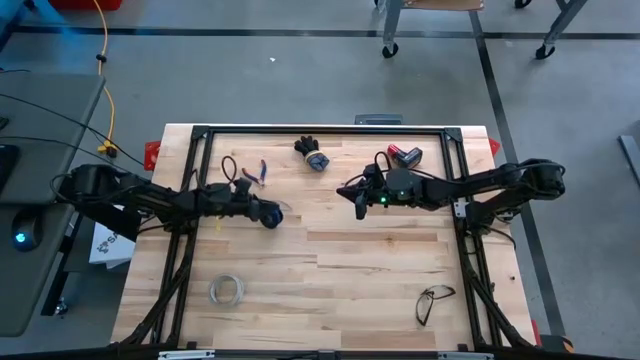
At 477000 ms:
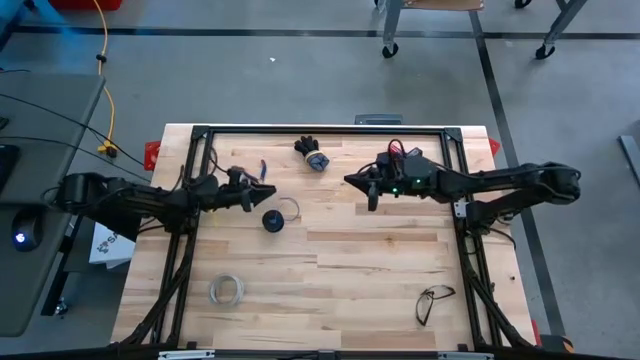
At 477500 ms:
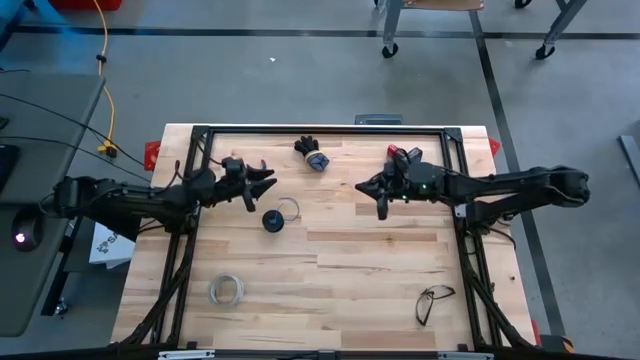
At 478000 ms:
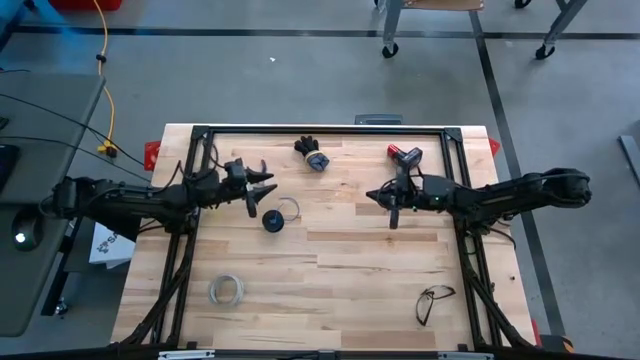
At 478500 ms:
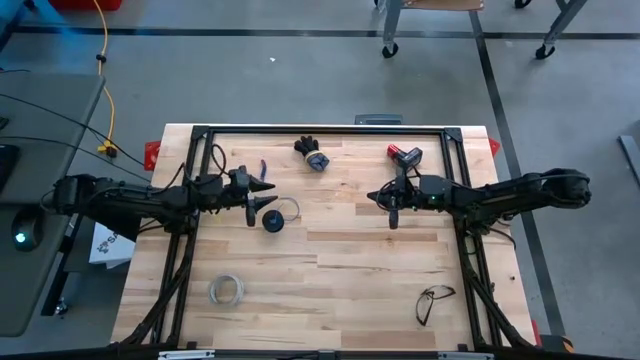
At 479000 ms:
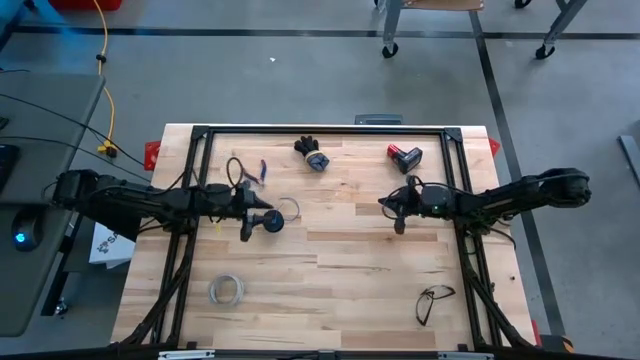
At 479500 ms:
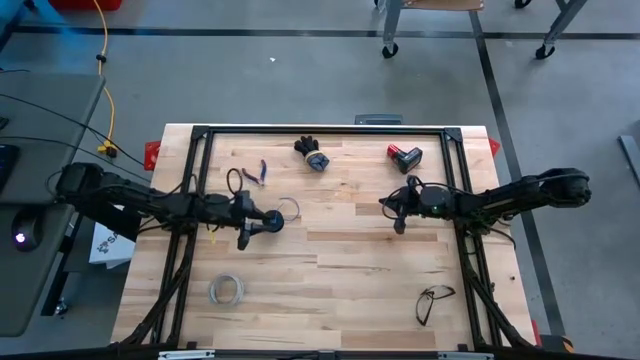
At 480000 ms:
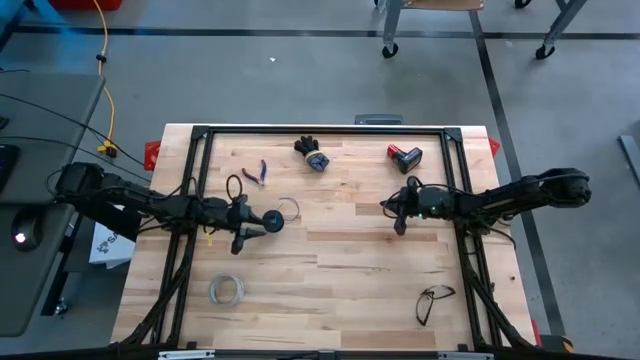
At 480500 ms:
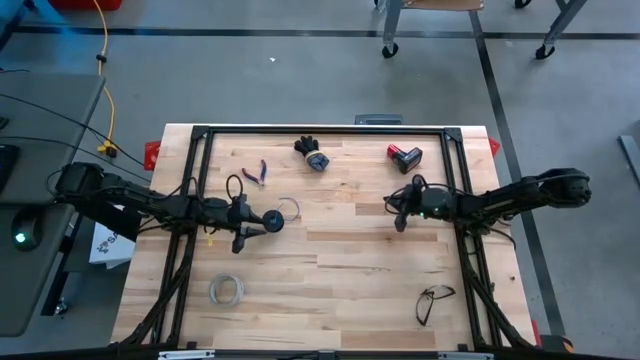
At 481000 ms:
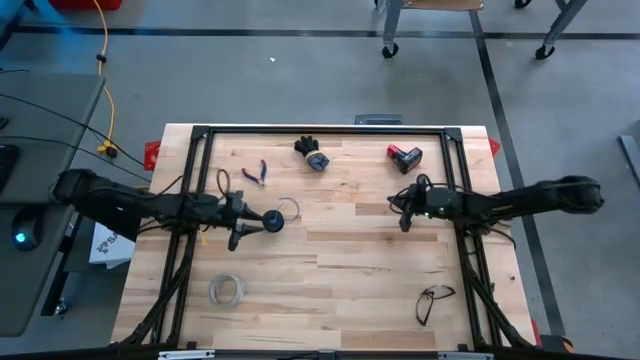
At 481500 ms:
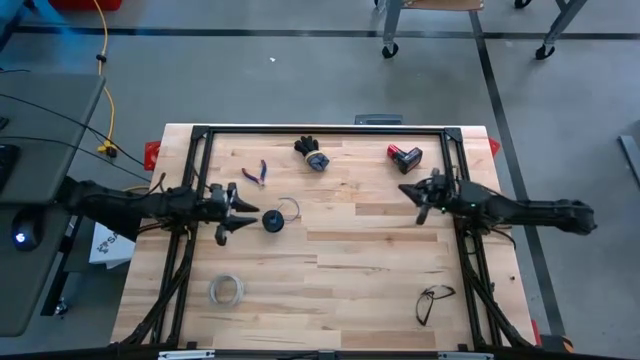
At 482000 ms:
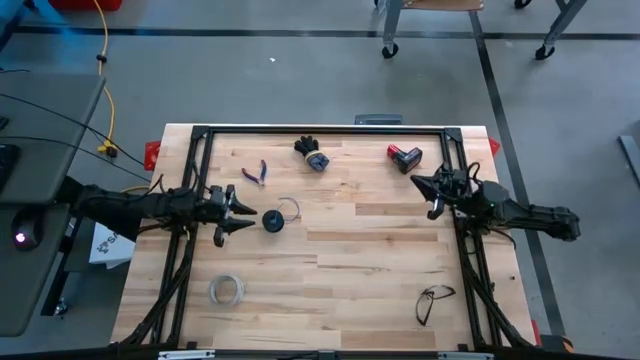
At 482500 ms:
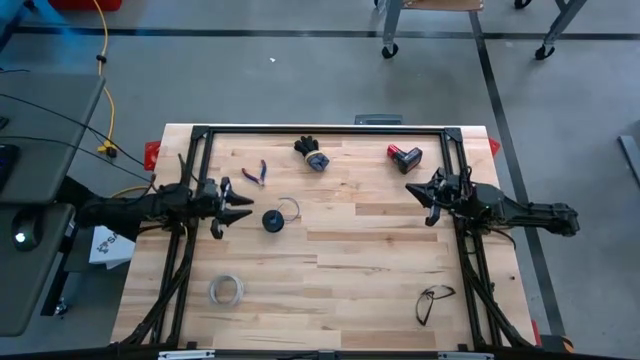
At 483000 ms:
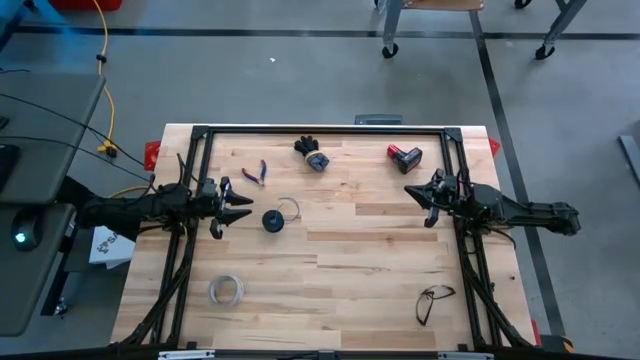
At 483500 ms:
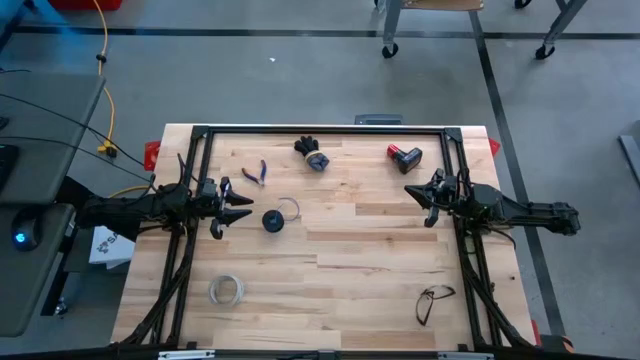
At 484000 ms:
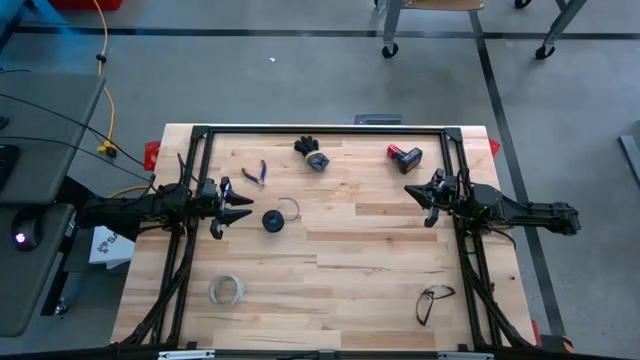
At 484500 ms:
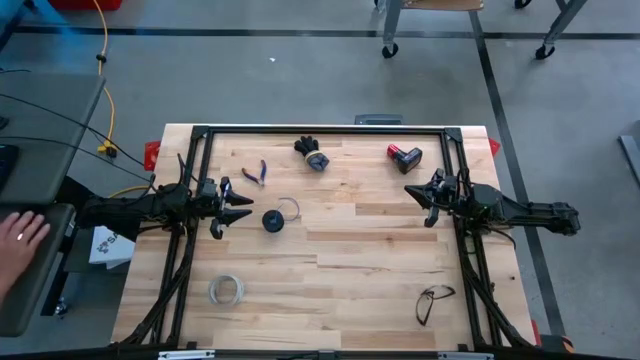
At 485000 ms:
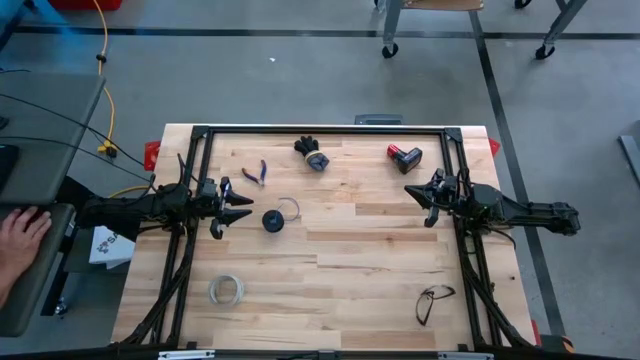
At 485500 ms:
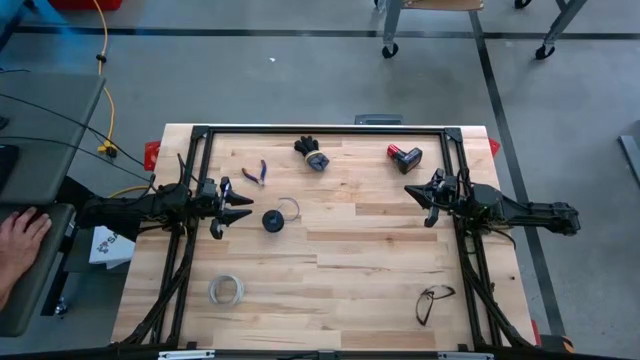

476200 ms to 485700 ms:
Task: Coil cords
Return to Home Position

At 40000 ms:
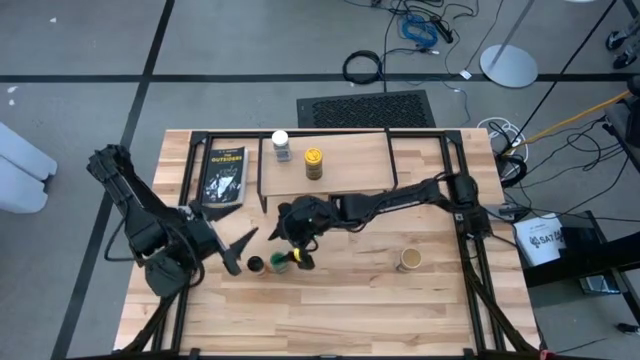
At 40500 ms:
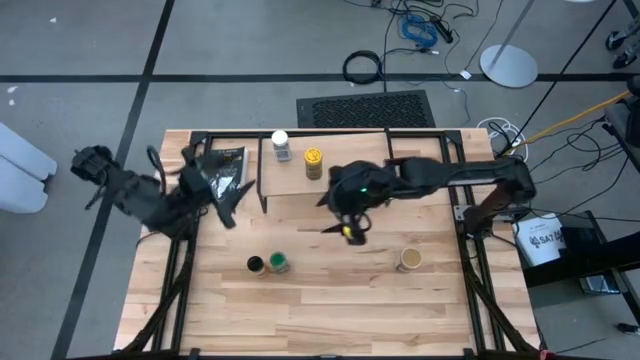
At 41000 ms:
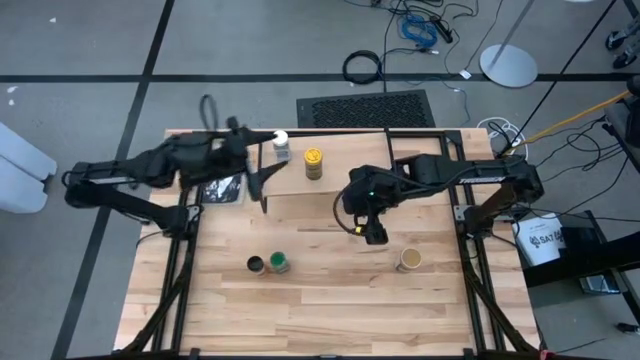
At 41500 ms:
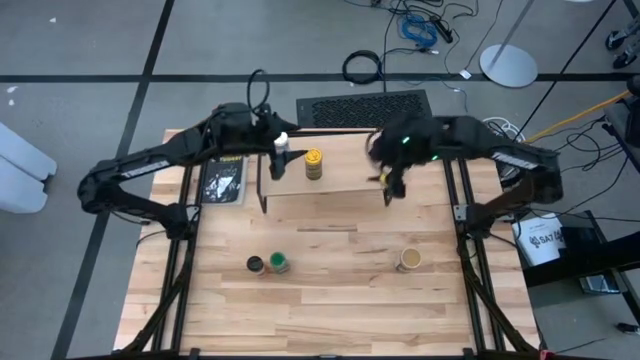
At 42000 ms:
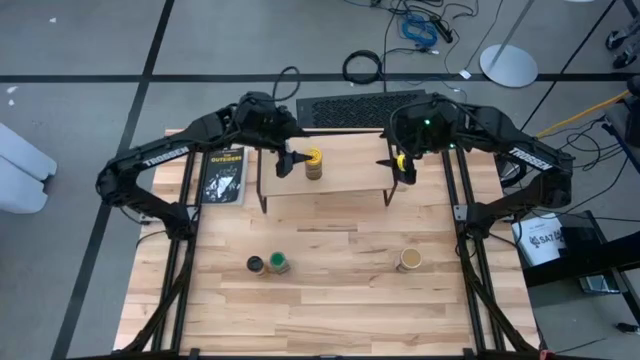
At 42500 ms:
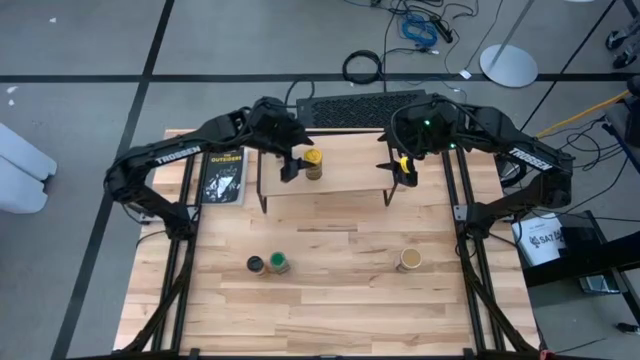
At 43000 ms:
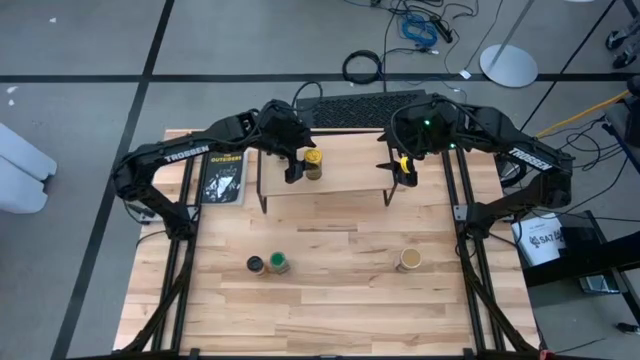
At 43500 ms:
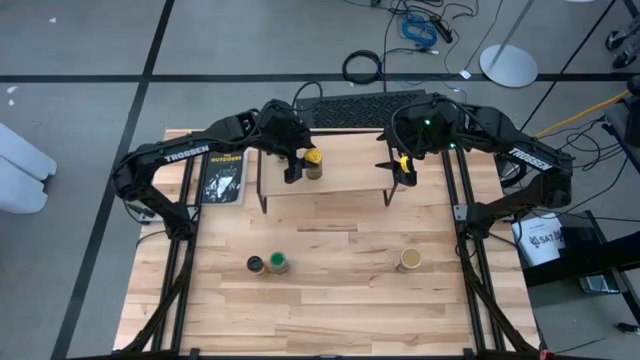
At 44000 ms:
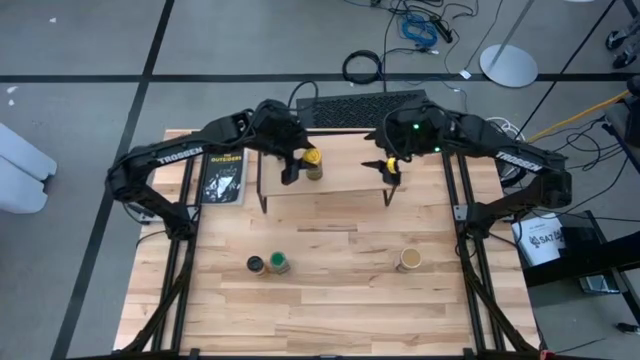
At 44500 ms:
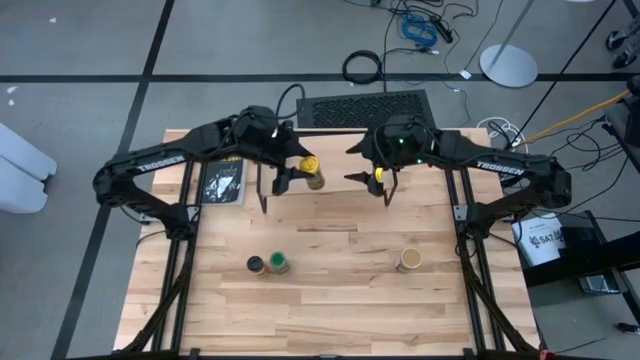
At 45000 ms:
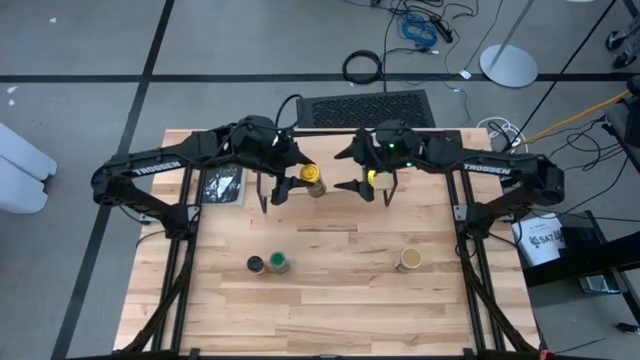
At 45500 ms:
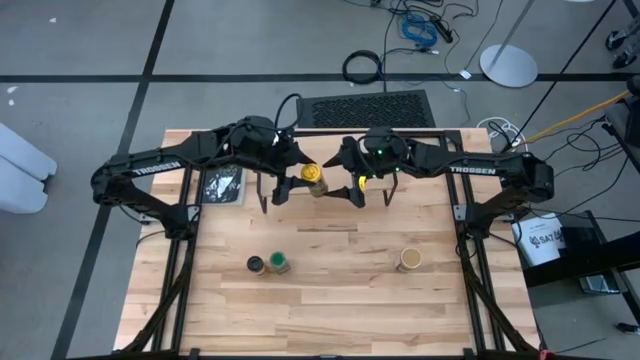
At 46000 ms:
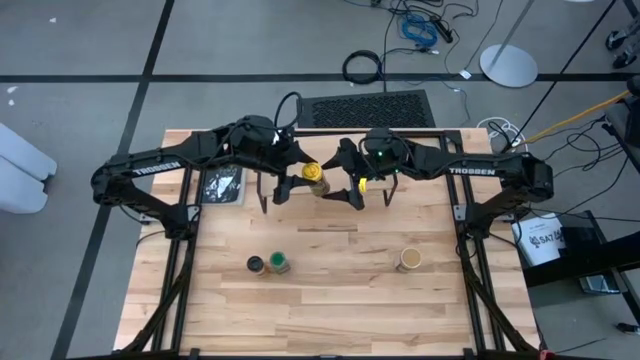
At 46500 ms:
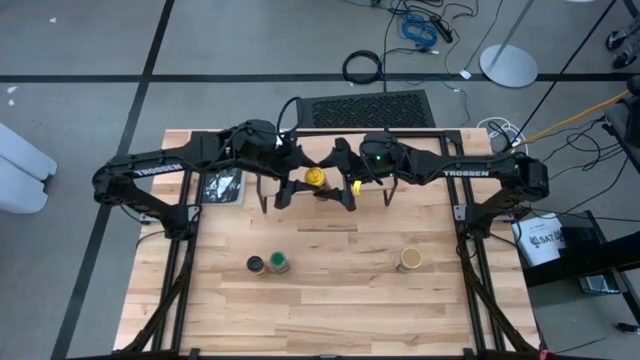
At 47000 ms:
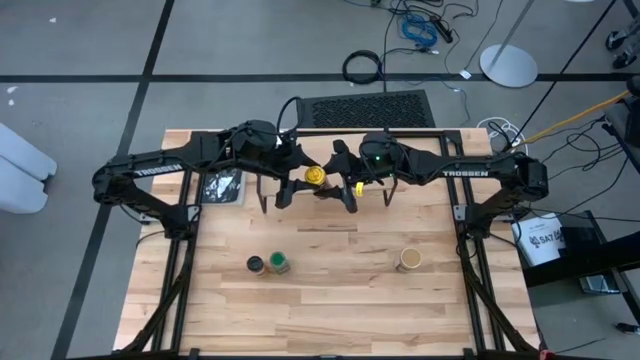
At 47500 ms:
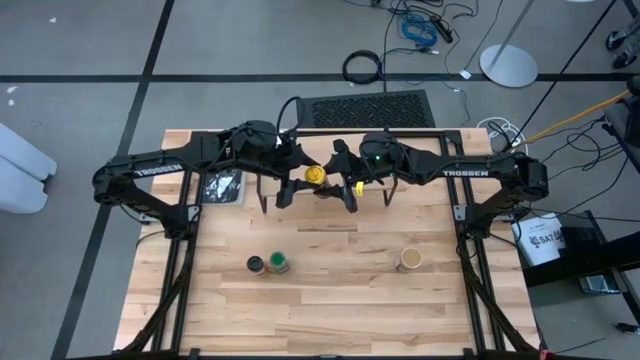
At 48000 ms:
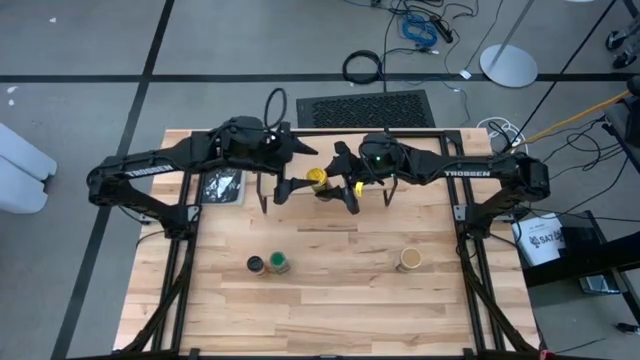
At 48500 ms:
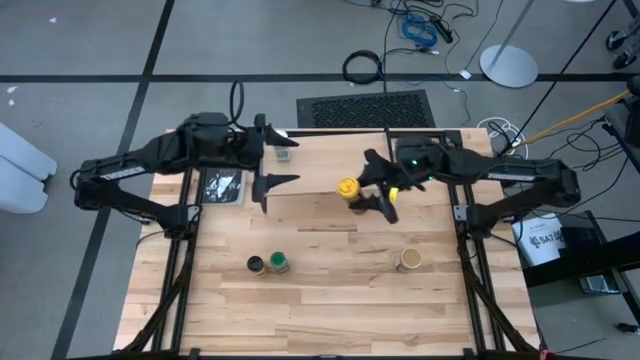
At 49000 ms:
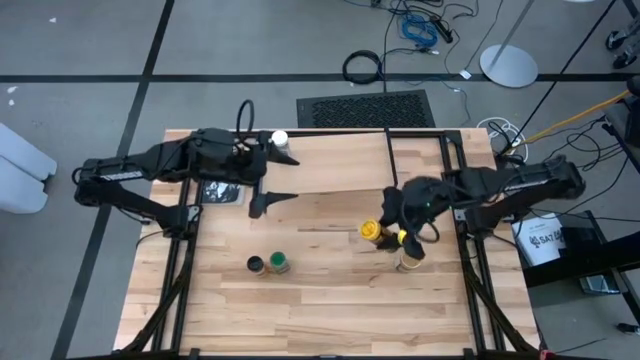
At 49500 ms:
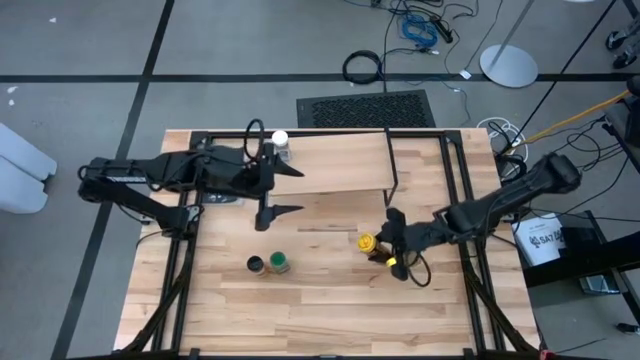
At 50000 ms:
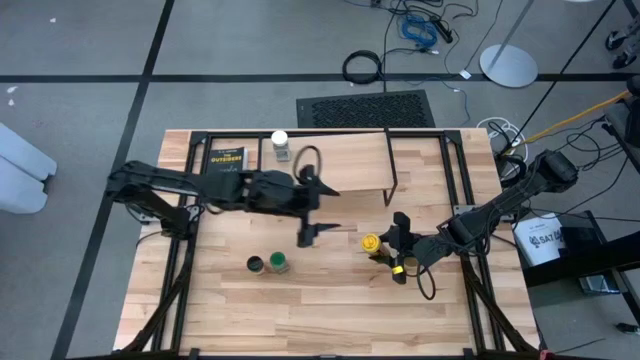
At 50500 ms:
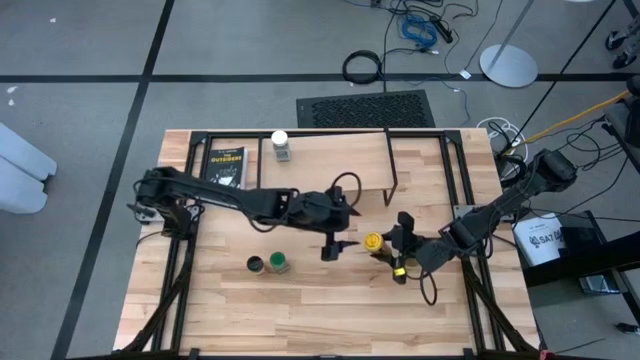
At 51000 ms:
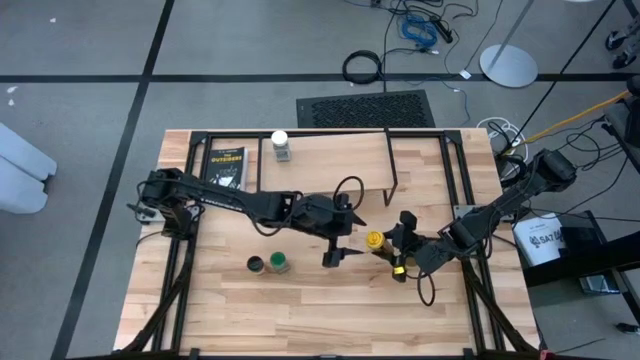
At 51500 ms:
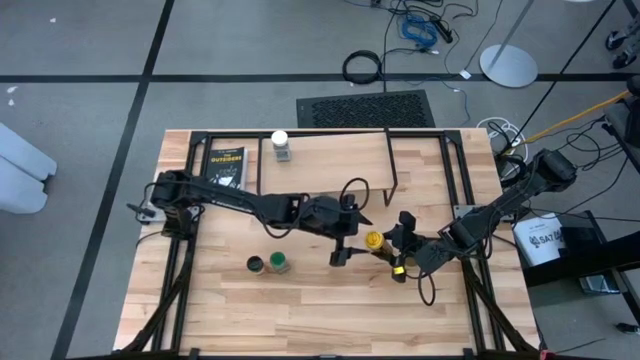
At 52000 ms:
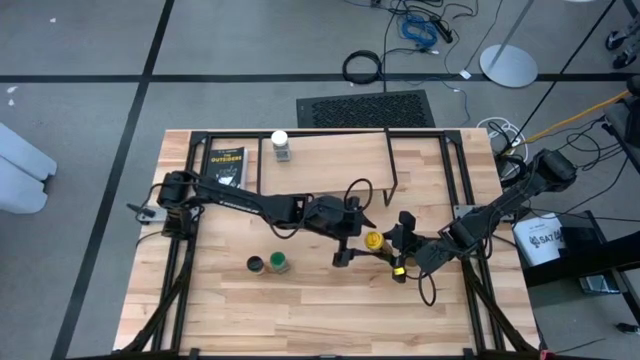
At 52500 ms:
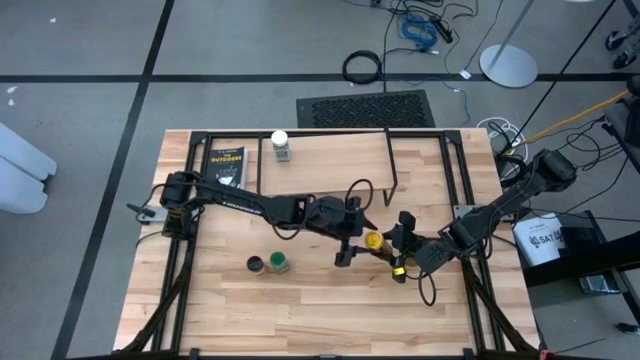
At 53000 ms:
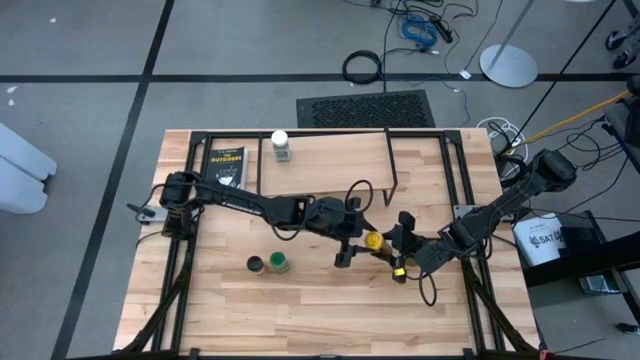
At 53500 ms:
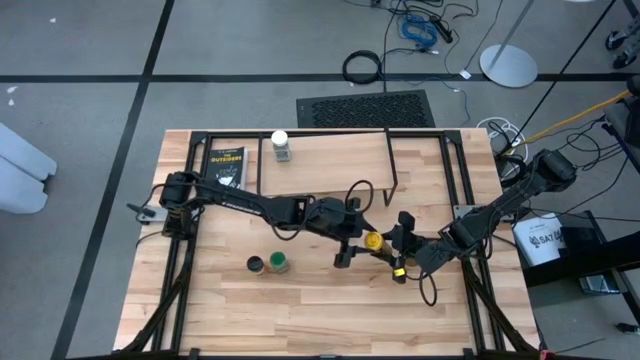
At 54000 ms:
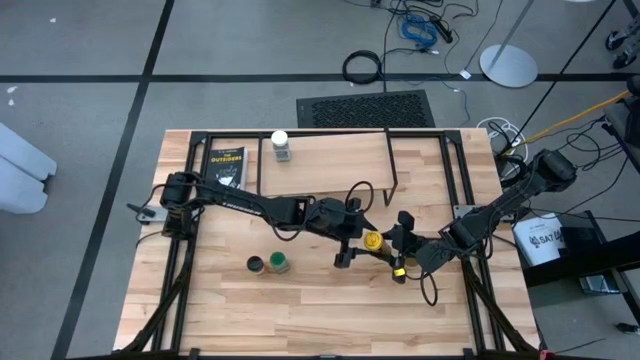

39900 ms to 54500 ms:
Task: Shelf spices
Remove the yellow seasoning bottle from the shelf
